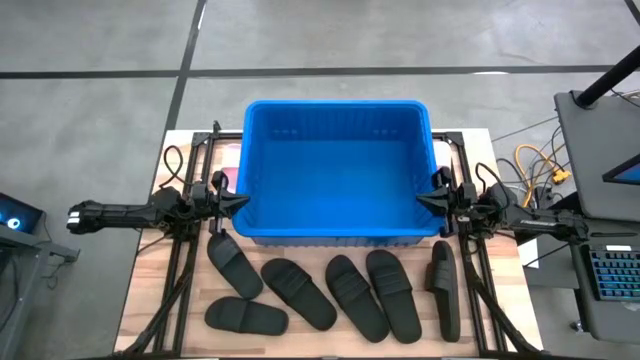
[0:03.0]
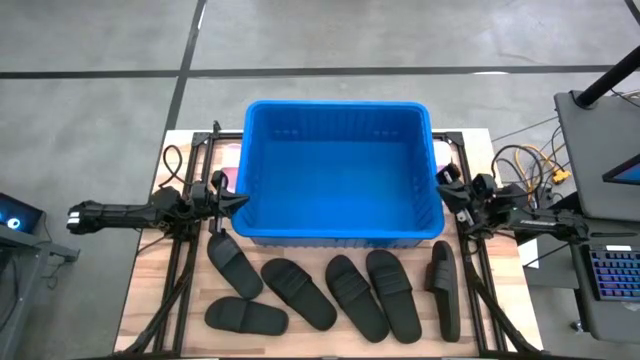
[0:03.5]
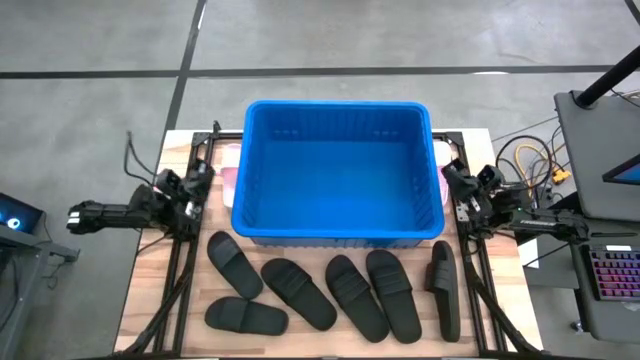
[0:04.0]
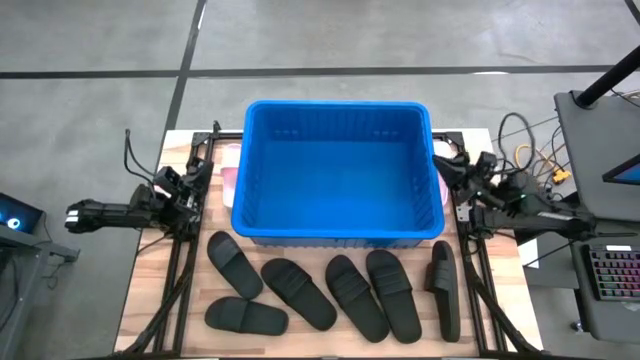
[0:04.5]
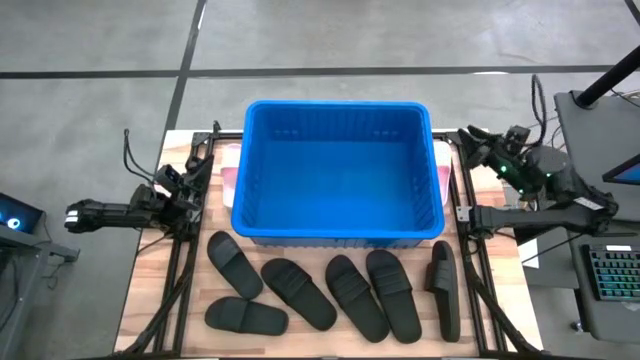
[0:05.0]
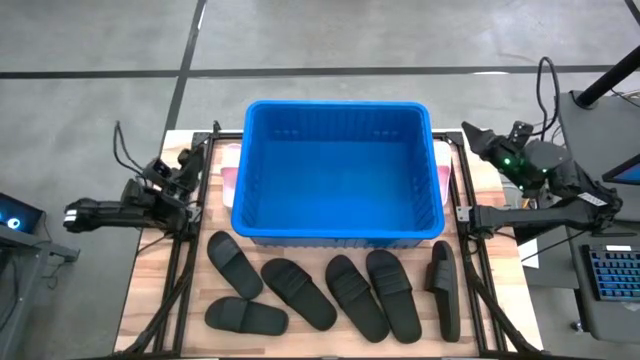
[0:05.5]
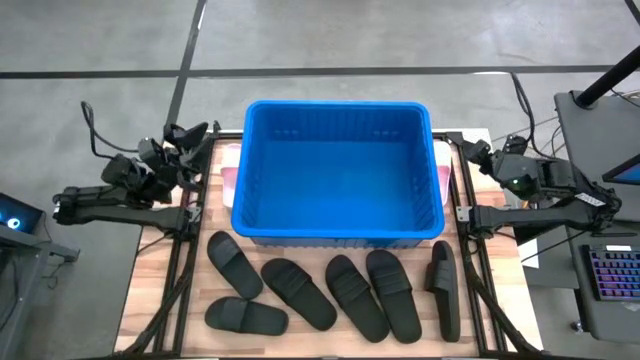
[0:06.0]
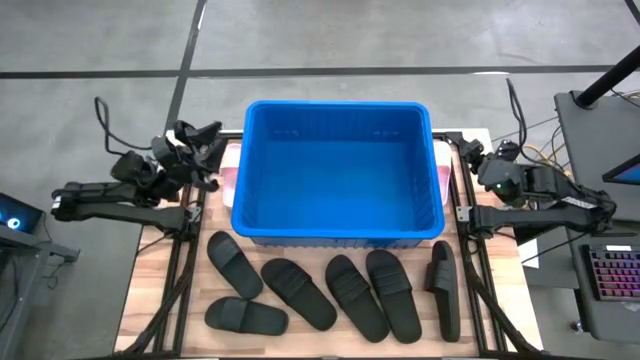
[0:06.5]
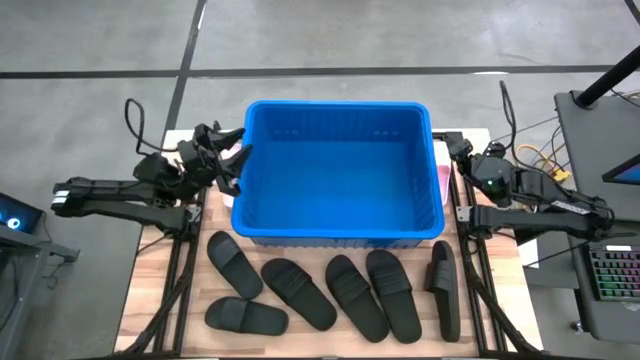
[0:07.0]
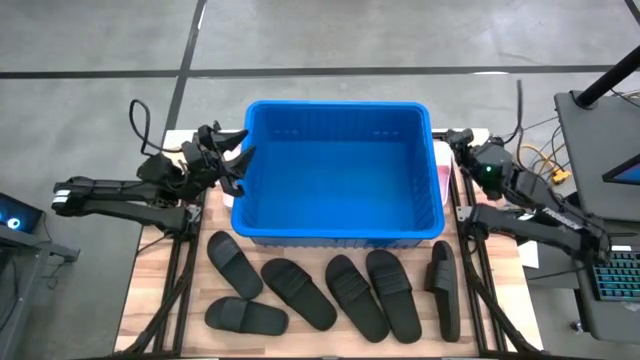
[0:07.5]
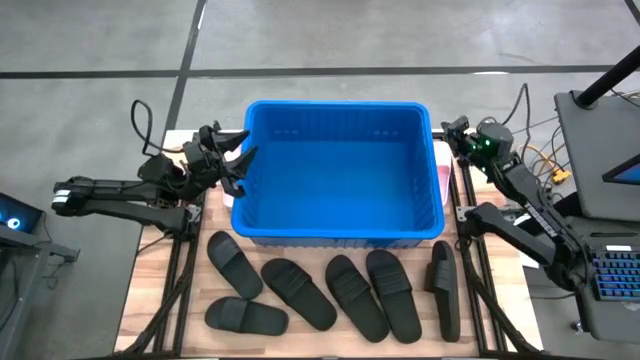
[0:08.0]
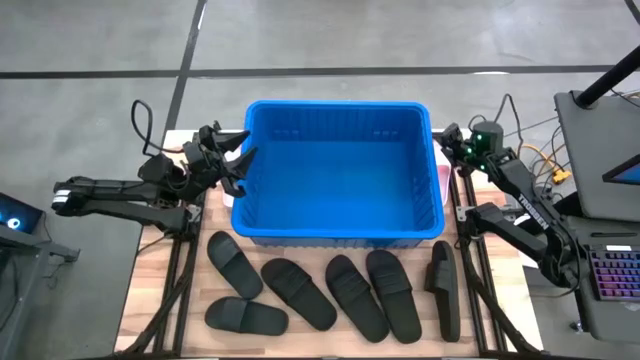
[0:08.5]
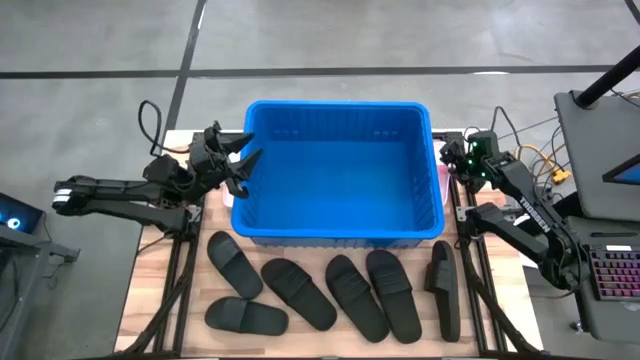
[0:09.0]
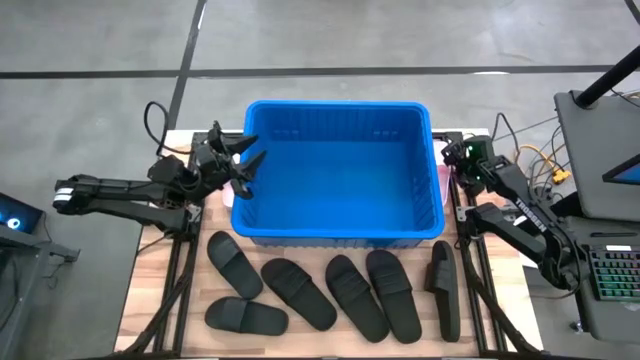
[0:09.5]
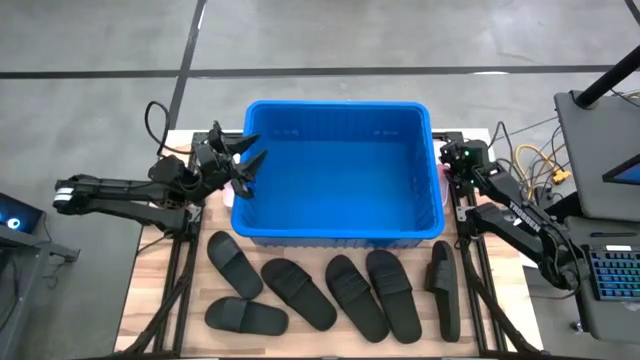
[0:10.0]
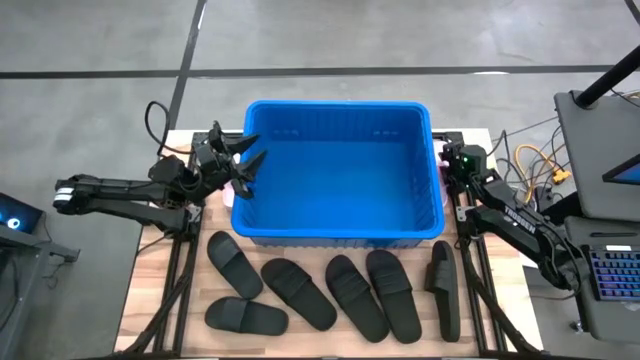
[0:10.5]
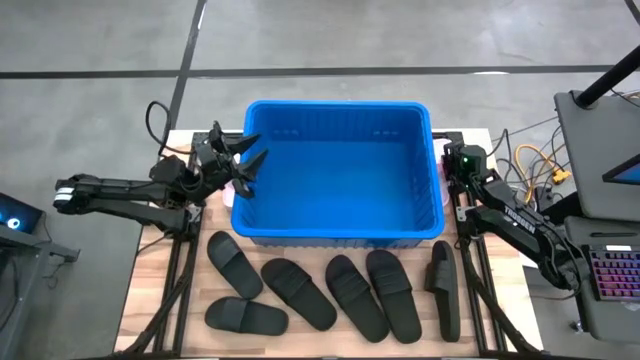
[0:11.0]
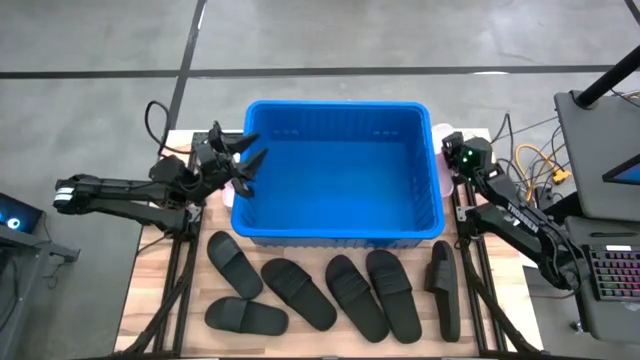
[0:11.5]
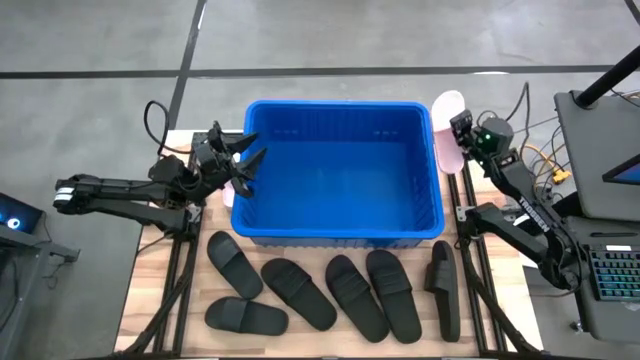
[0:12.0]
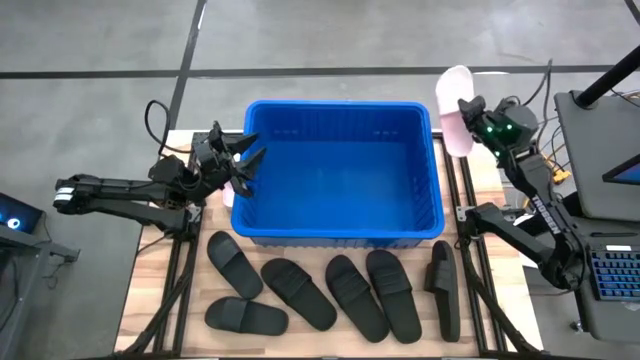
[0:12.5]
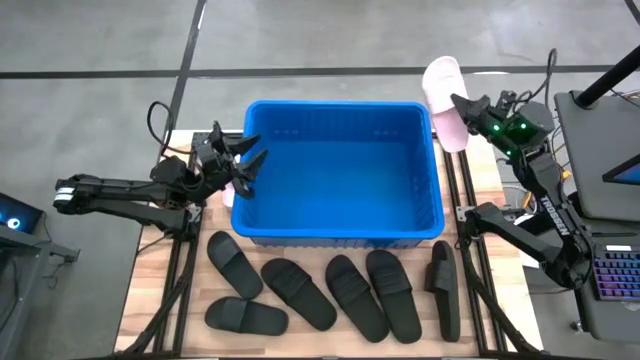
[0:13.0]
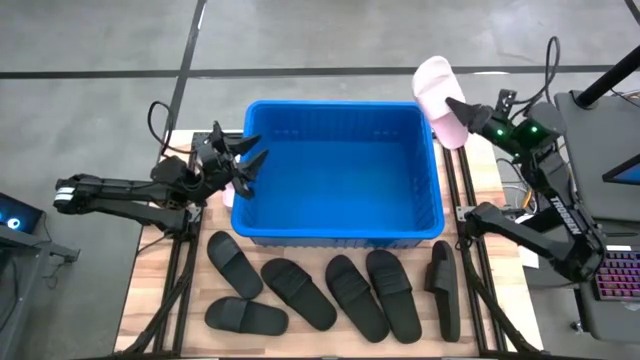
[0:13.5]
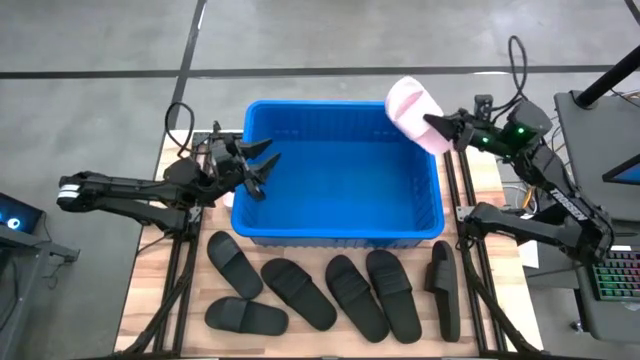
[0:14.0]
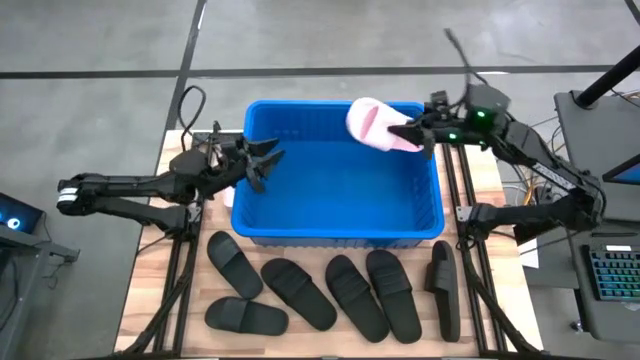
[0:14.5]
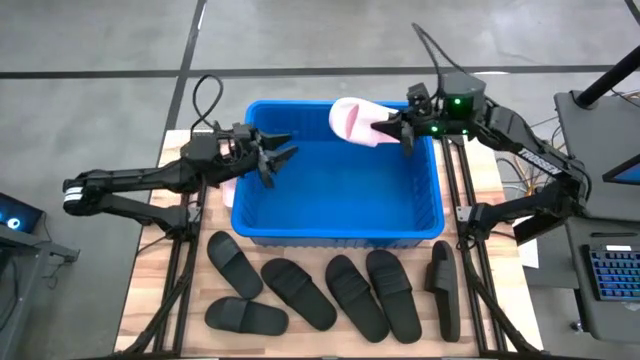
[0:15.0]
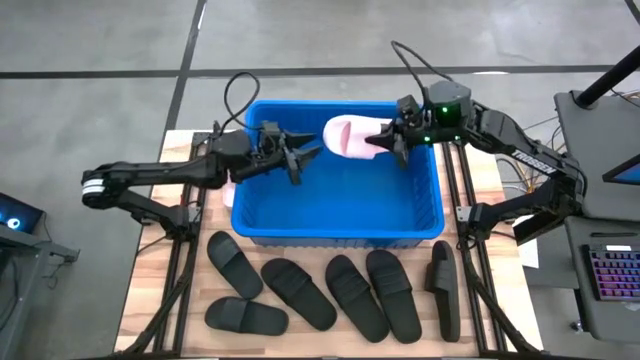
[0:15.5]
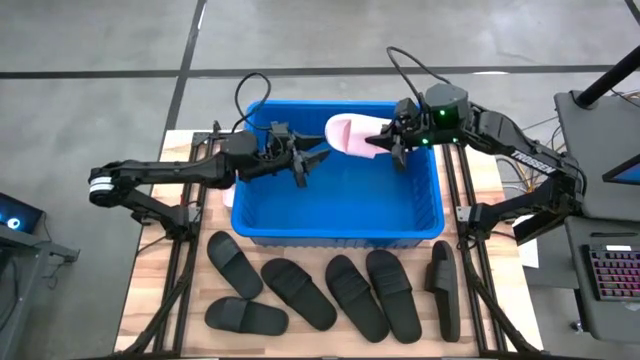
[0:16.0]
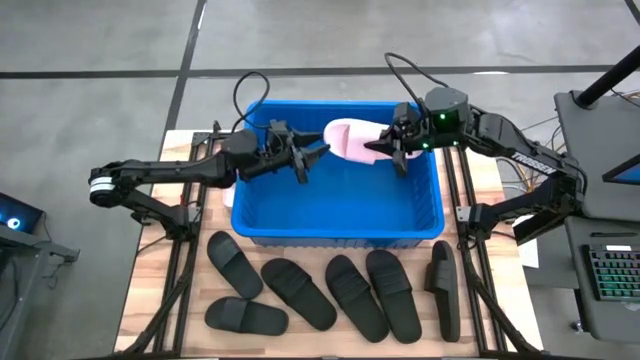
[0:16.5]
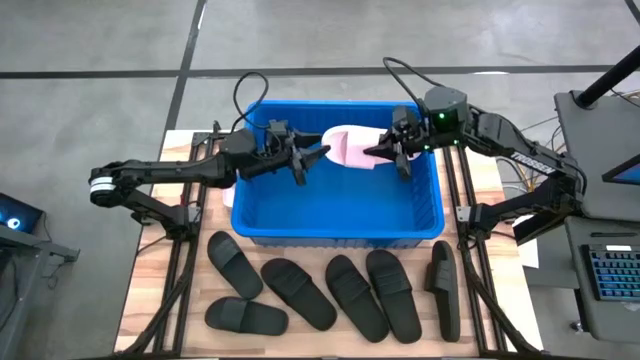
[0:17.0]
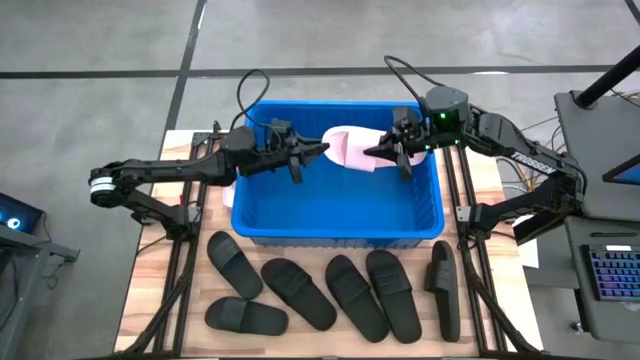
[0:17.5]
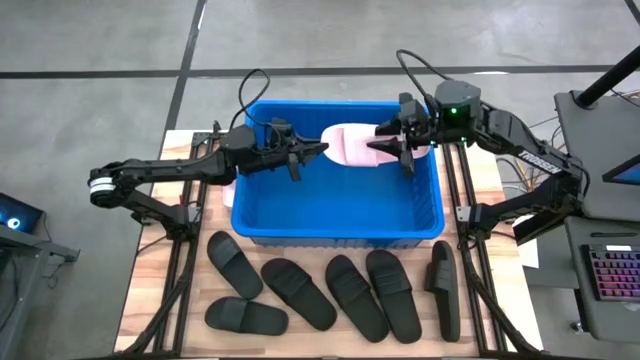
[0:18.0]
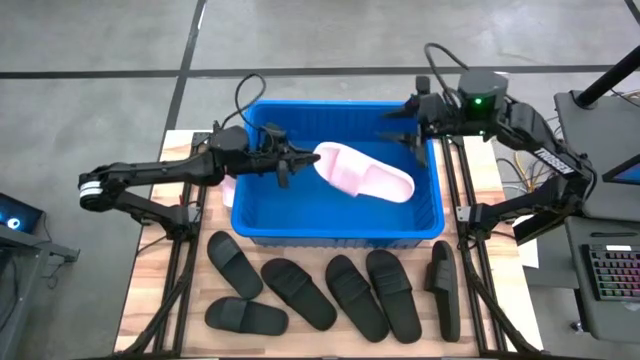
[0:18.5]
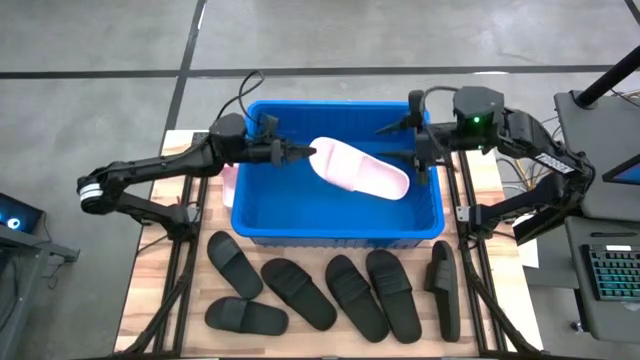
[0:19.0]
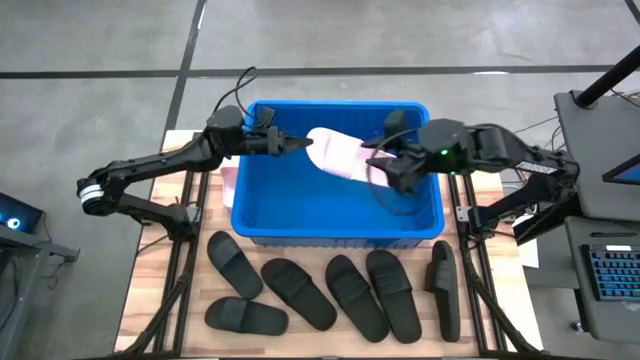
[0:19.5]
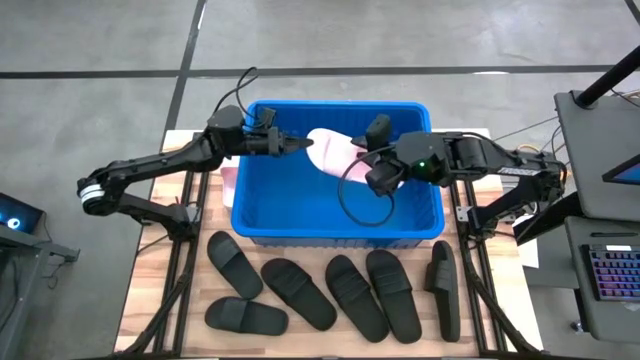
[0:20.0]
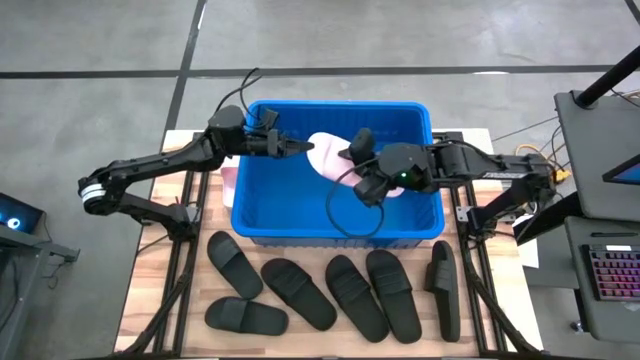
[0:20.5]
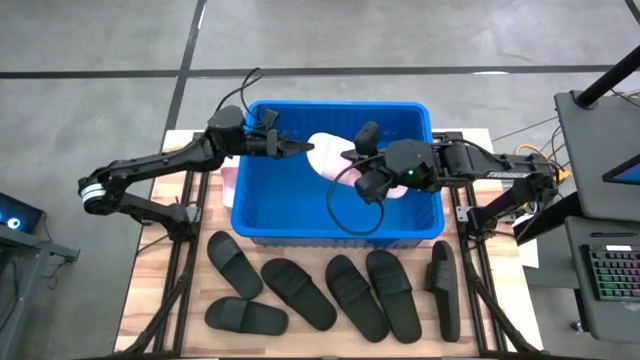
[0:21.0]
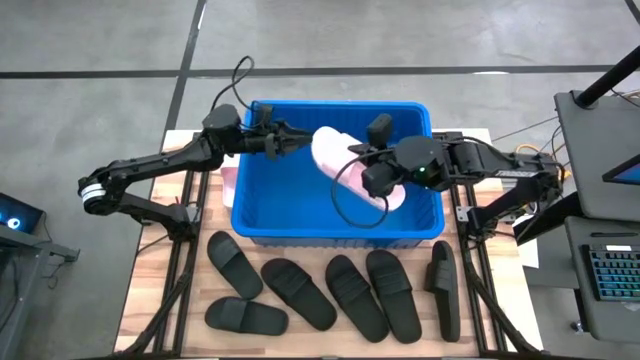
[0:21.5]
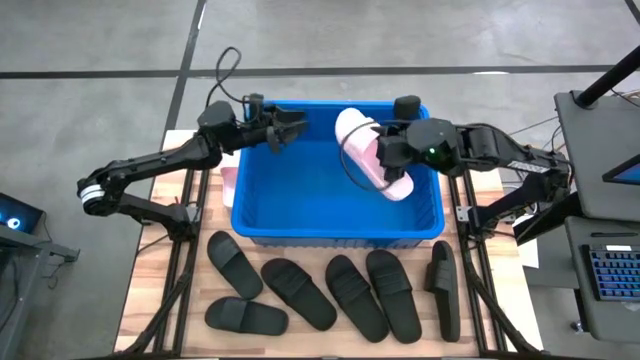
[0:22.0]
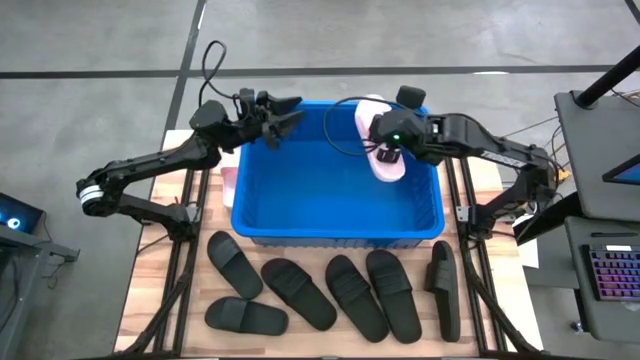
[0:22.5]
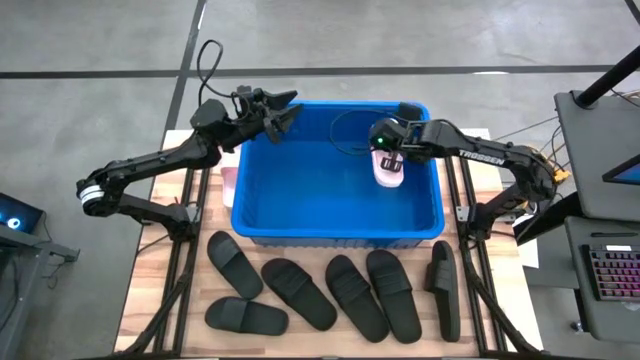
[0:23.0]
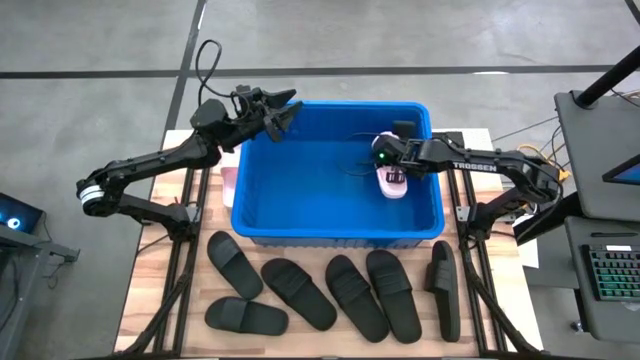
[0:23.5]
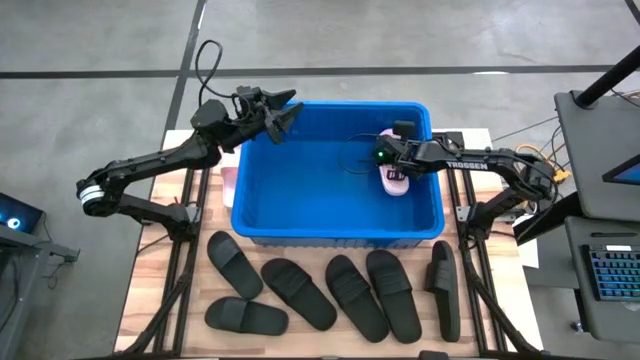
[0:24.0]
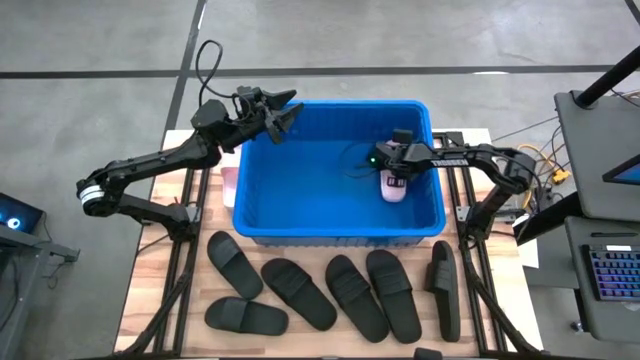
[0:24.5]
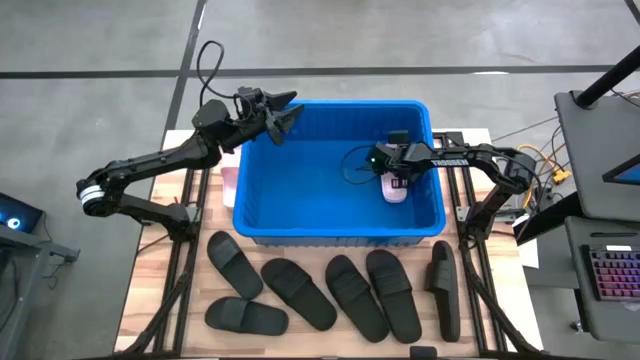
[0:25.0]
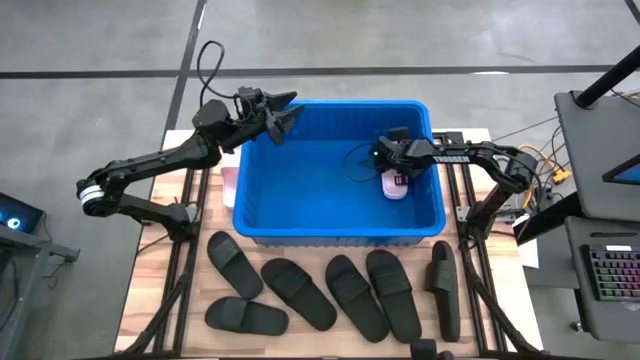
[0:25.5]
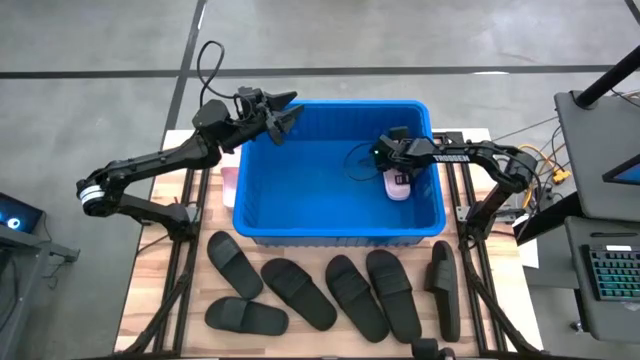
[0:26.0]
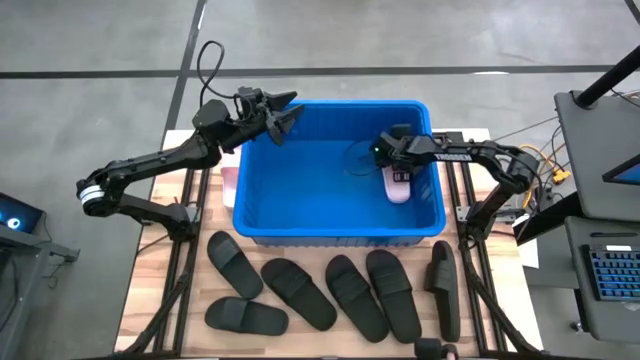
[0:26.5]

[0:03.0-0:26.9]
Task: Pick and place slides into bin
Put the pink slide into the blue bin
